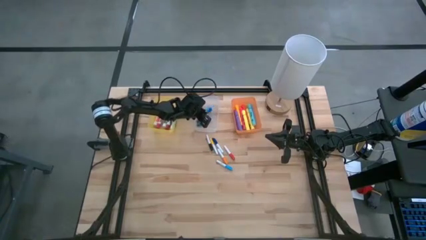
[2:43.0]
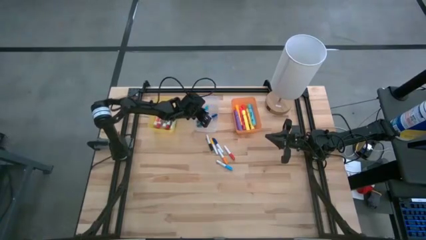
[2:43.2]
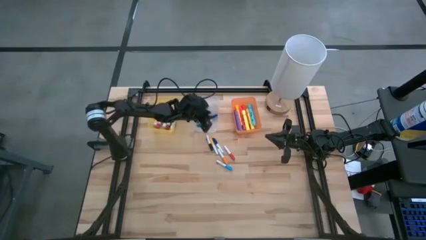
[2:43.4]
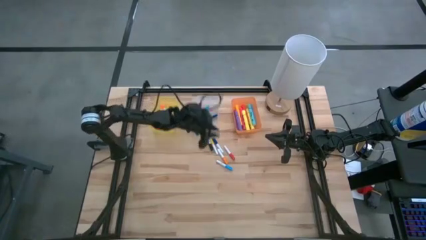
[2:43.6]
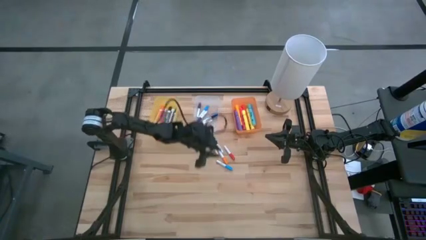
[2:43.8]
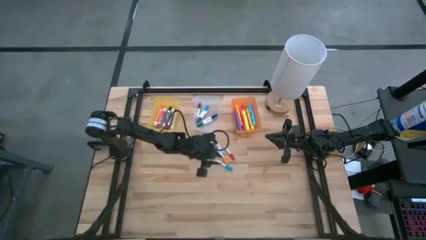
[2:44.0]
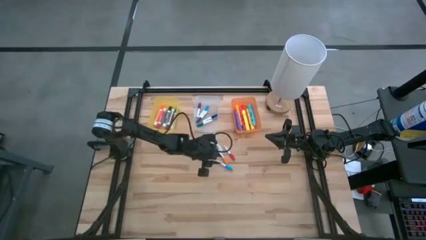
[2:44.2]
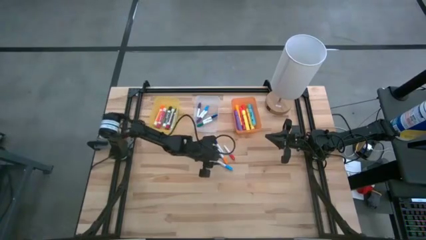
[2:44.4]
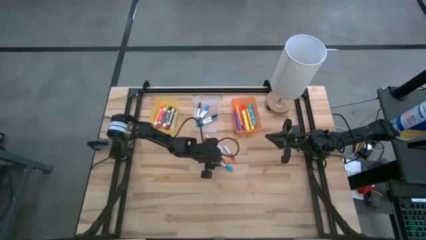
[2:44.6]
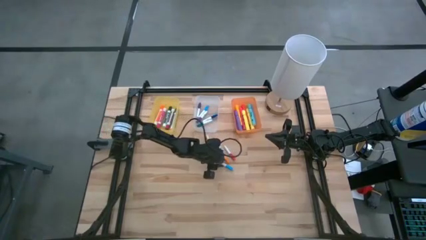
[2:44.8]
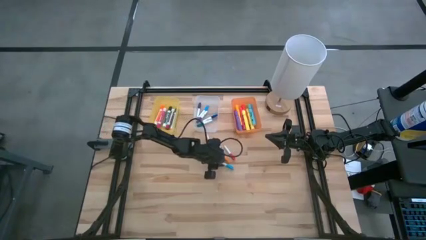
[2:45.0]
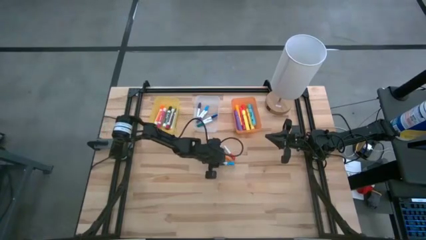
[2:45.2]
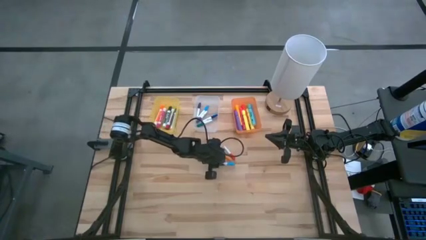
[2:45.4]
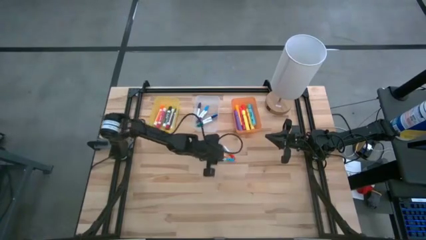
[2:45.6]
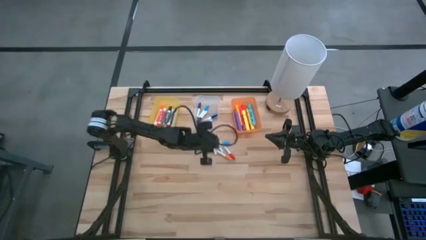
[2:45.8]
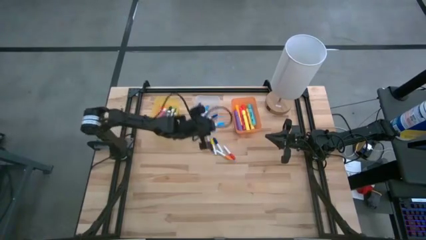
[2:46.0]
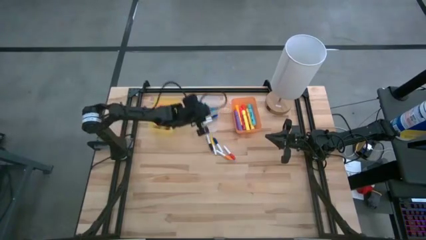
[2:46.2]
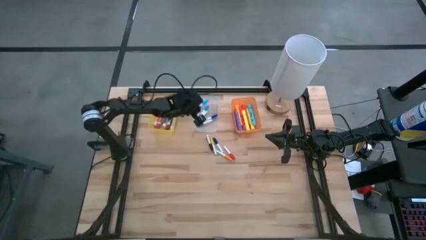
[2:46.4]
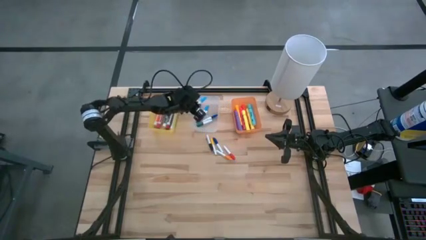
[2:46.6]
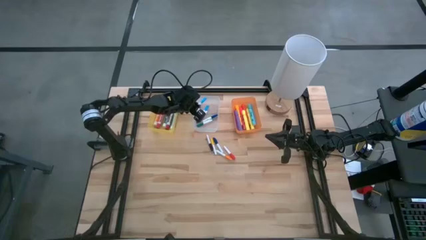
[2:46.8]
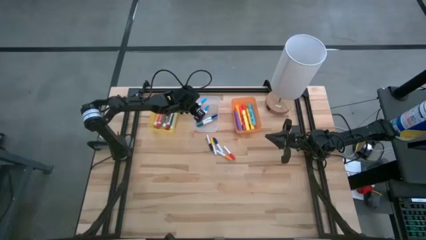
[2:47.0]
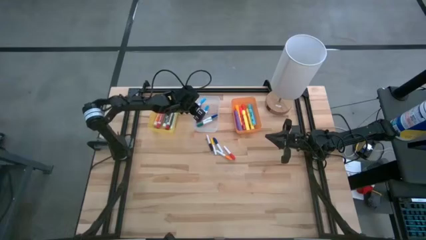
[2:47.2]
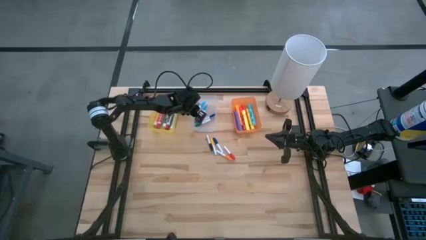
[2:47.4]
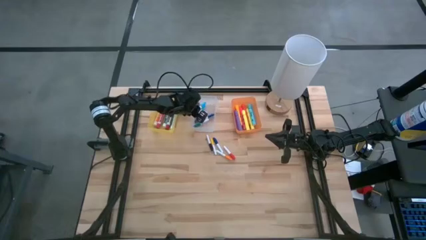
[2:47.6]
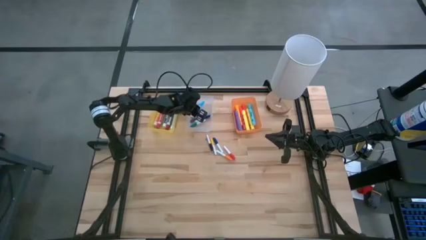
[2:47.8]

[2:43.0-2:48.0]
Task: Pick & Place Markers
Put the small light blue highlighter pen into the transparent bin

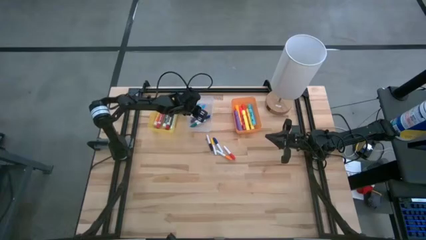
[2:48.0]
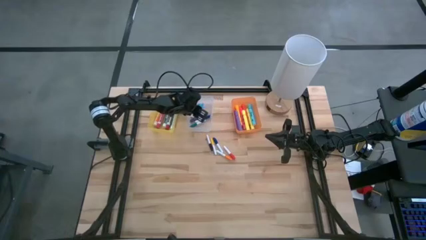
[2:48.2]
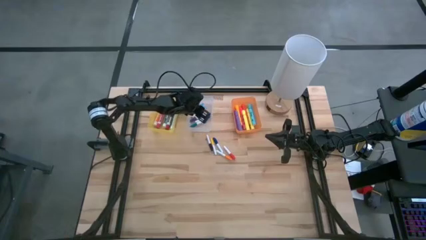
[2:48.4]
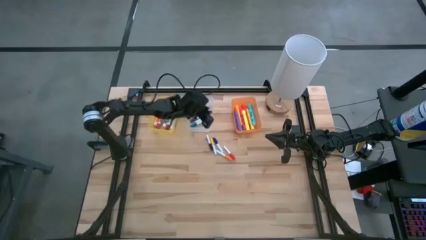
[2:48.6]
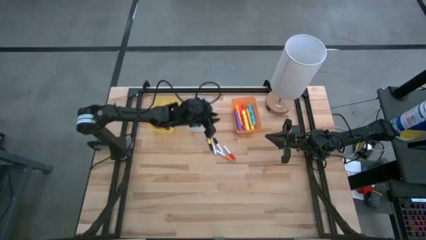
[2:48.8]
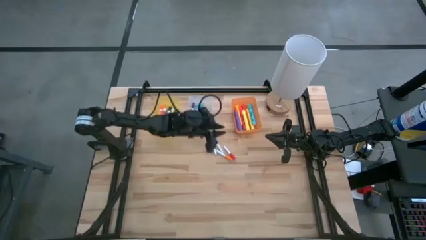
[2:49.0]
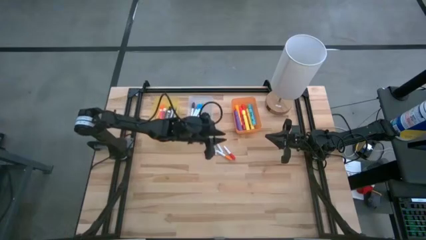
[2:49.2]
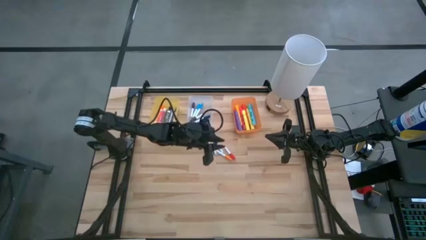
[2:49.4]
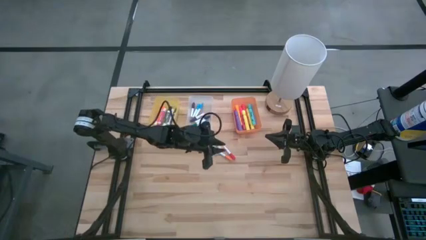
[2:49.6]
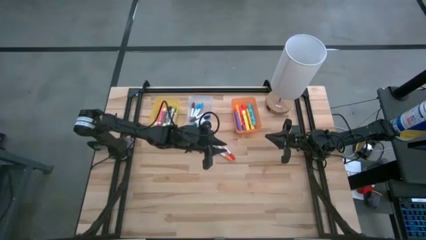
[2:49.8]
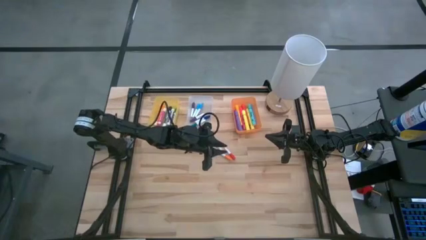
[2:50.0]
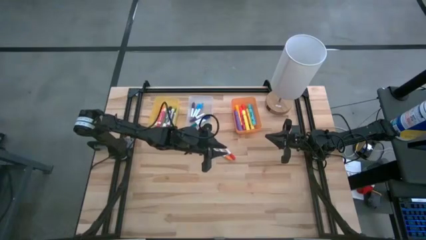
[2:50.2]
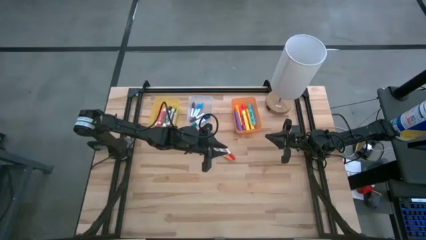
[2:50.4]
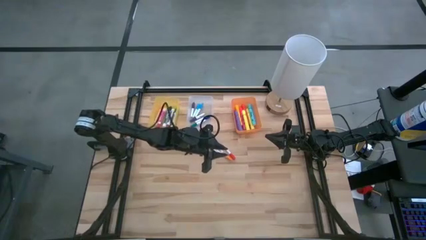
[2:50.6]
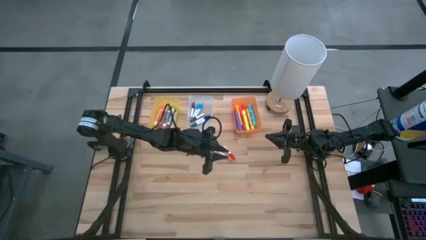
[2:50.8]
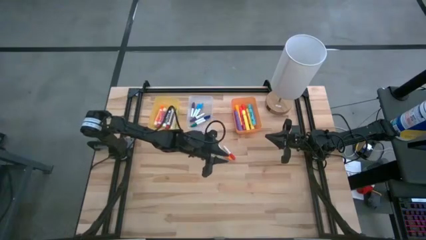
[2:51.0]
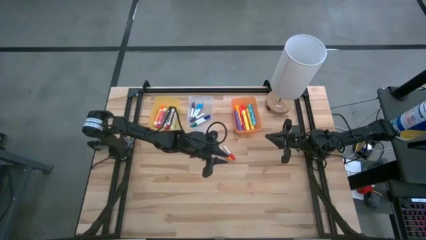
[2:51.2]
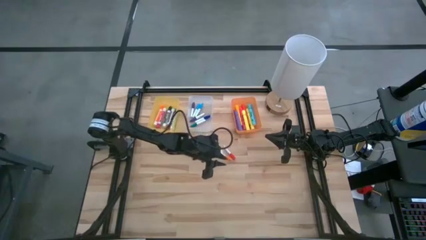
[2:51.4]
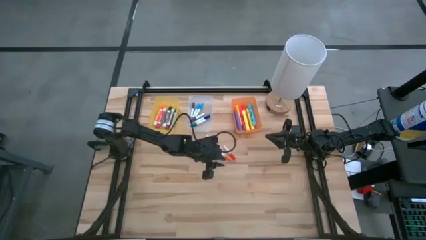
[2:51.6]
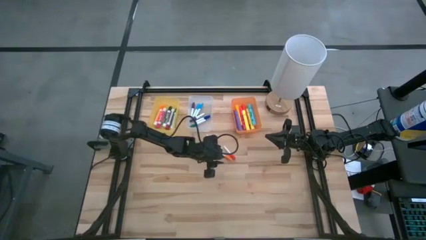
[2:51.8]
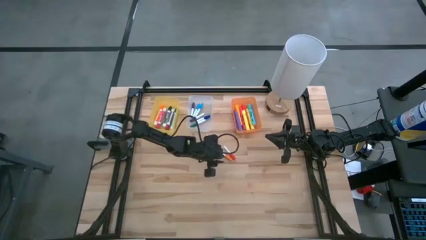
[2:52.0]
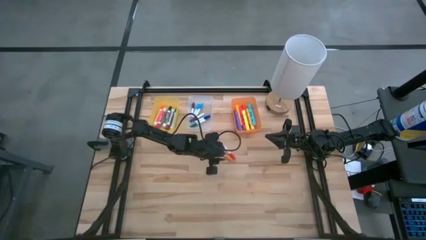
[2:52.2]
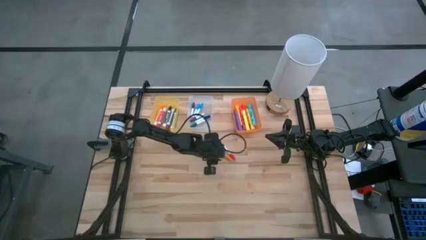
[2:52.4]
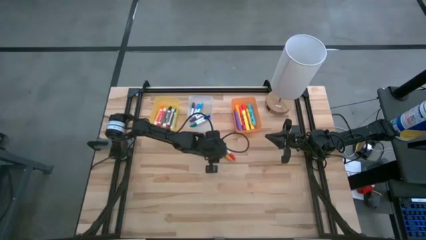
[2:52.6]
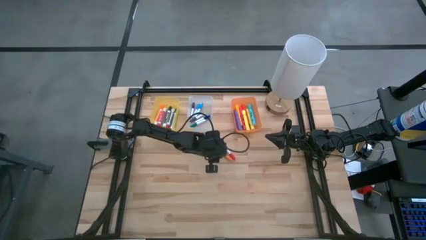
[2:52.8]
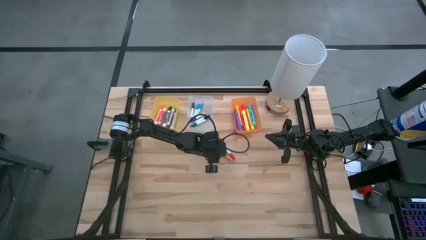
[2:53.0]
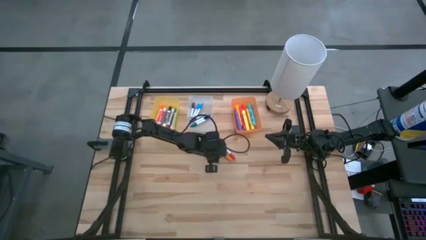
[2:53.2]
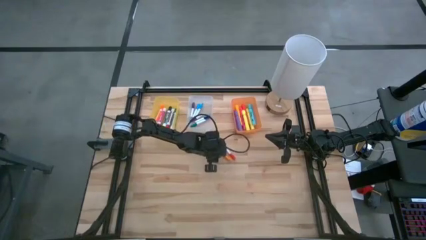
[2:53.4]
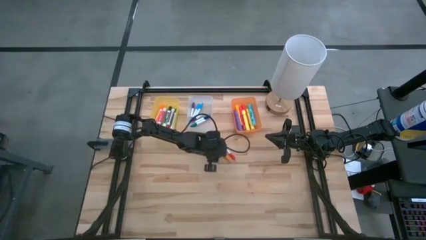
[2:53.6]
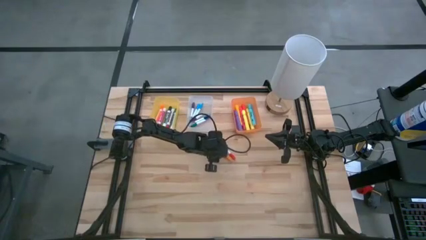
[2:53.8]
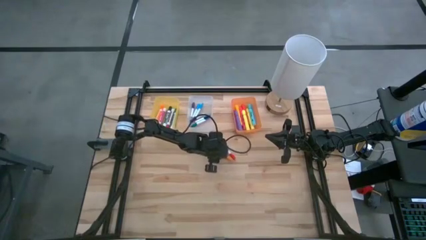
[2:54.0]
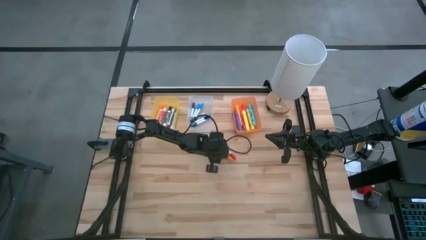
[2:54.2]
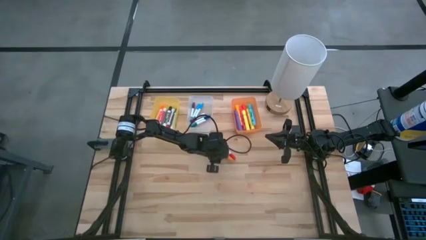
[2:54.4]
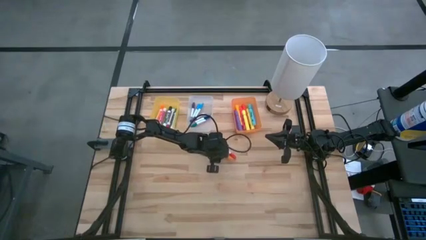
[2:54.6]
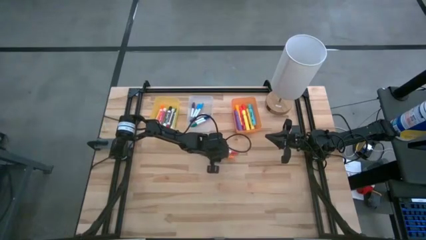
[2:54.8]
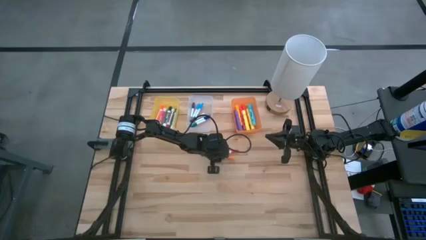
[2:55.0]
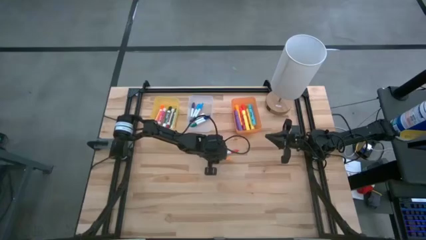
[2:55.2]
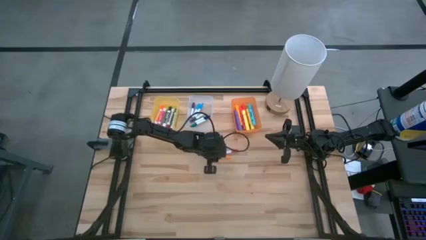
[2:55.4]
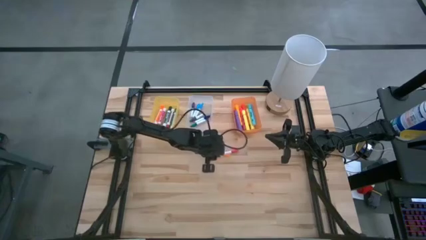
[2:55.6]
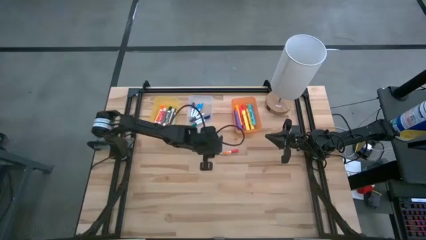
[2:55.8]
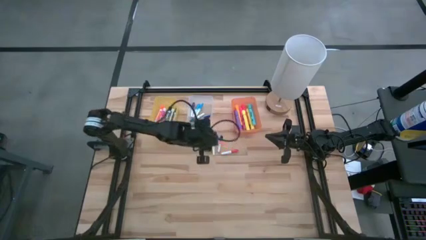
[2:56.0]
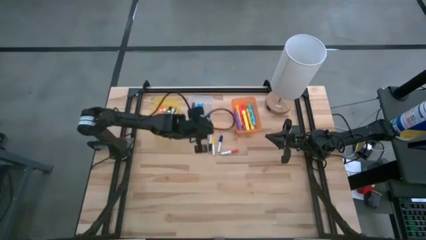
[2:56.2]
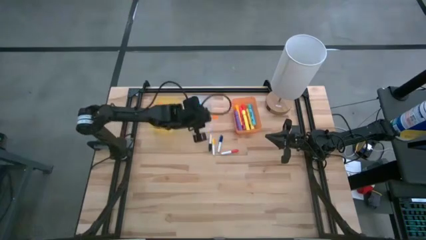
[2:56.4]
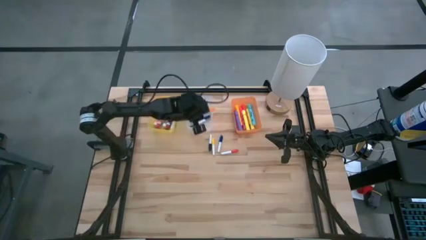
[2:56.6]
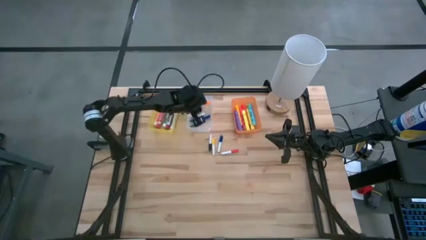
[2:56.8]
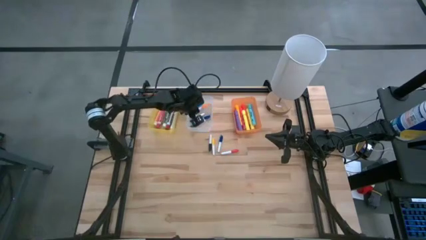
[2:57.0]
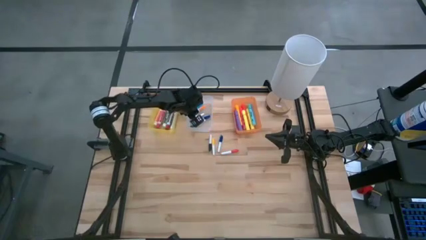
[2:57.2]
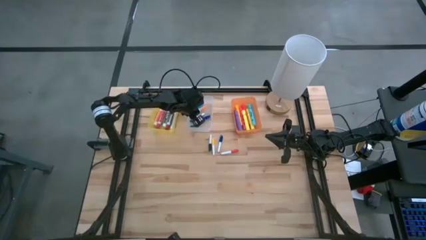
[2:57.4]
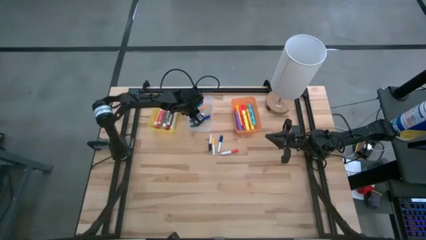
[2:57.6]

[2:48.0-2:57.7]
Put the small orange highlighter pen into the transparent bin

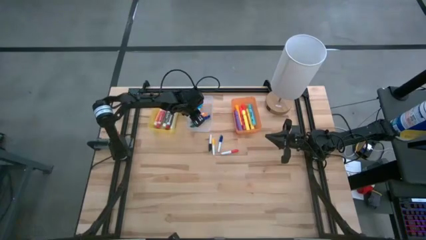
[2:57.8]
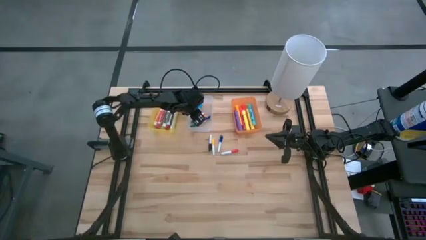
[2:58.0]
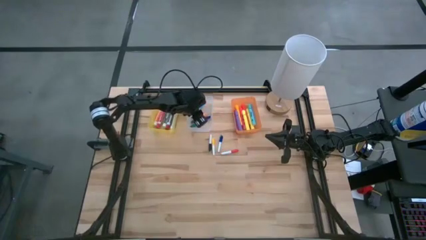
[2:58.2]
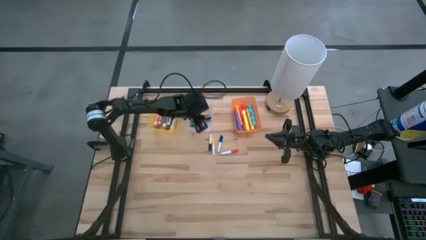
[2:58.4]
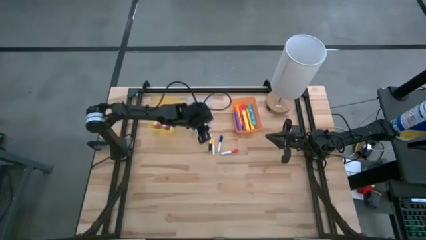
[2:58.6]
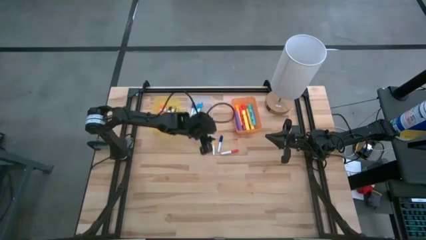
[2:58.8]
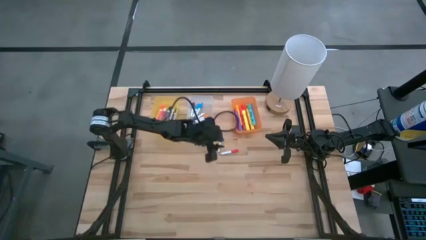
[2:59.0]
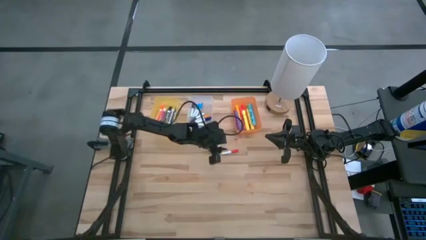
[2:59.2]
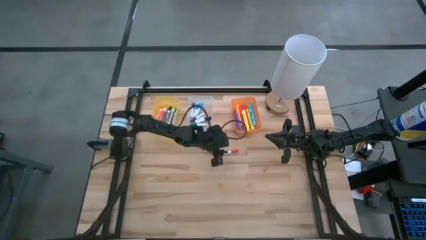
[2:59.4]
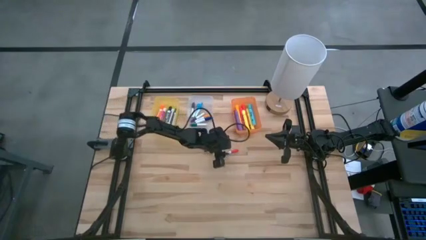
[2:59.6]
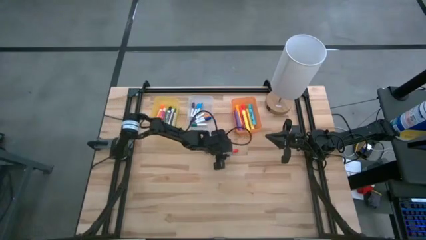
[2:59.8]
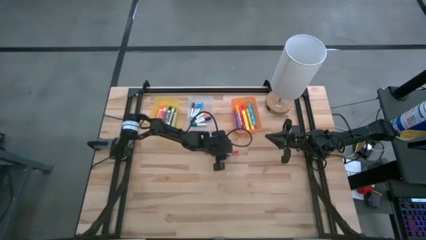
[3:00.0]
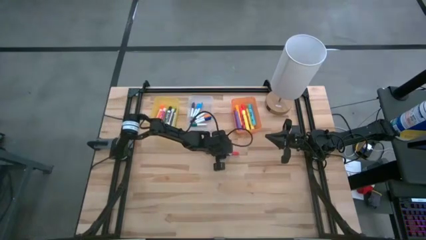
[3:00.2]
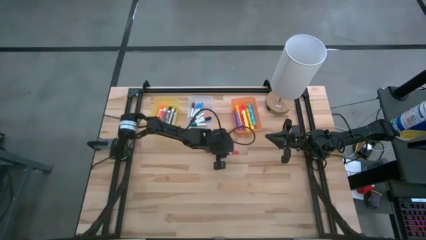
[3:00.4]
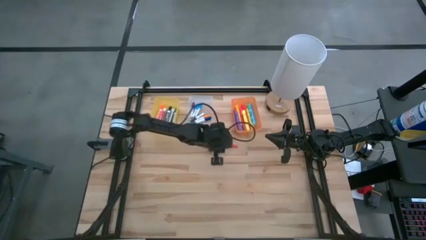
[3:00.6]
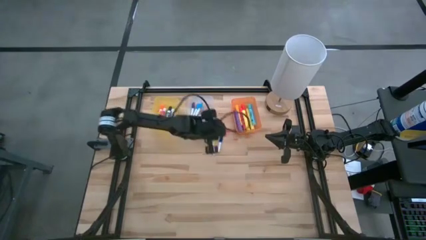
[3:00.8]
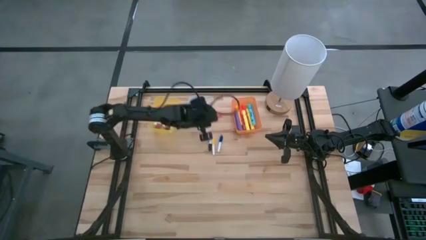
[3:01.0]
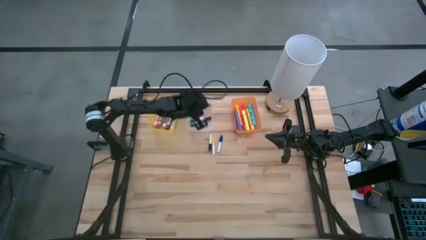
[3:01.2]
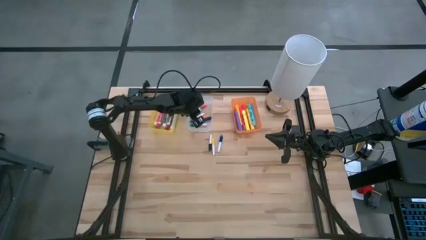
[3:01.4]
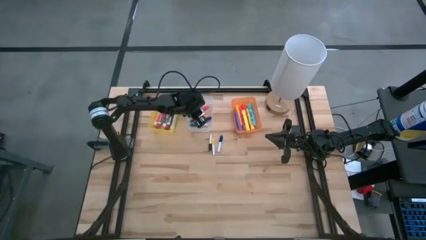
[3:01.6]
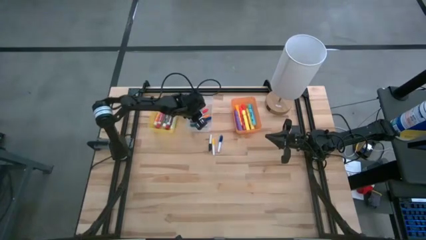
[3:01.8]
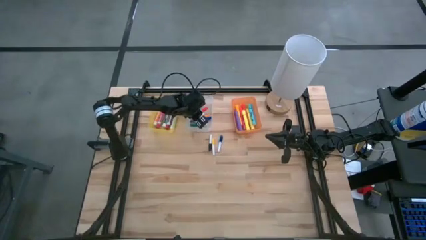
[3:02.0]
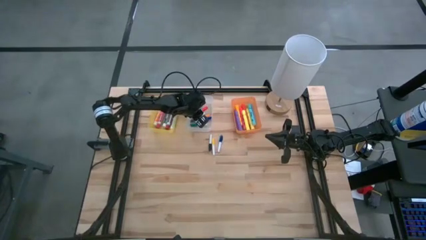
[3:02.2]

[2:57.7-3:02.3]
Put the small red highlighter pen into the transparent bin
